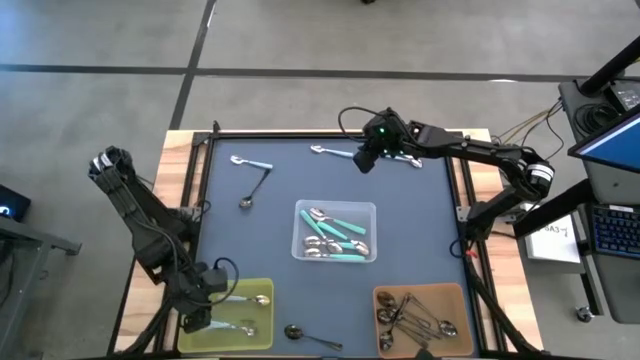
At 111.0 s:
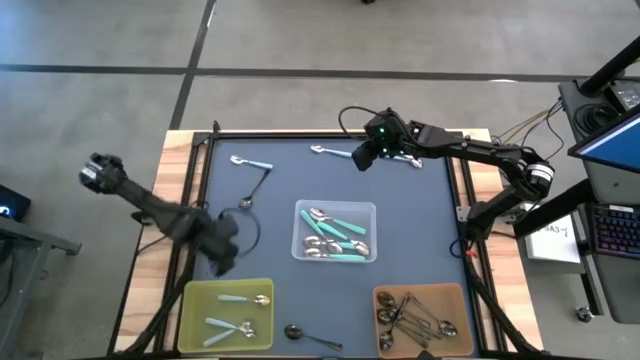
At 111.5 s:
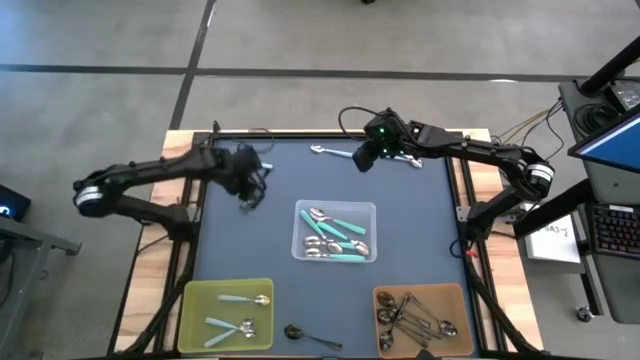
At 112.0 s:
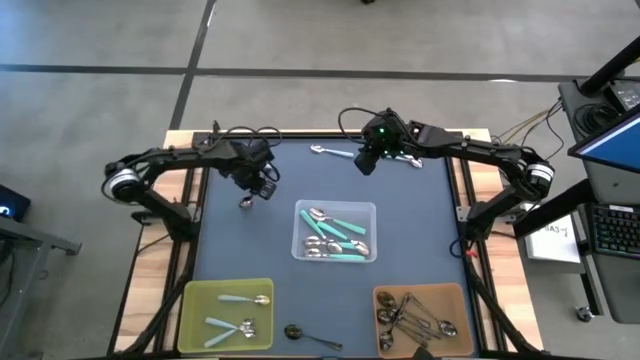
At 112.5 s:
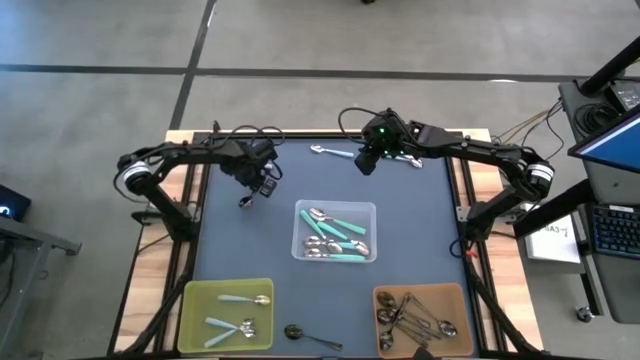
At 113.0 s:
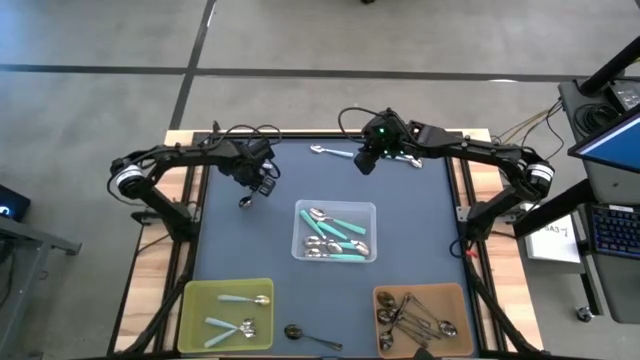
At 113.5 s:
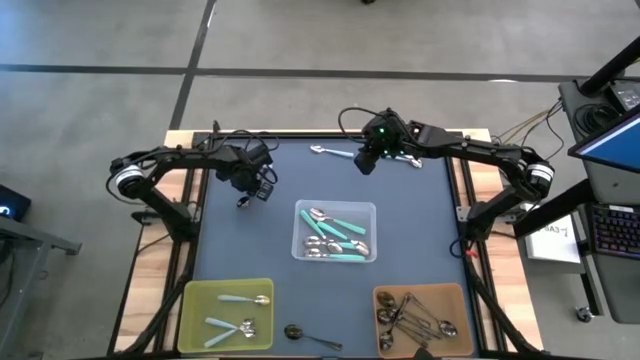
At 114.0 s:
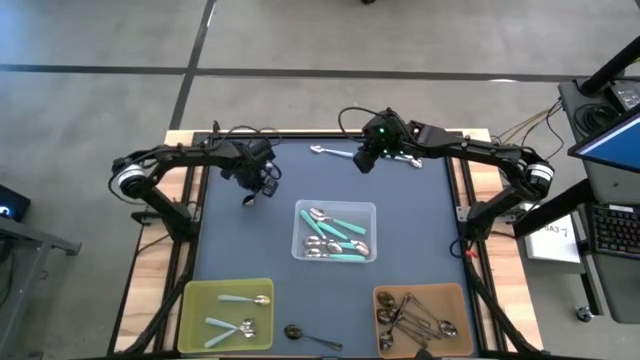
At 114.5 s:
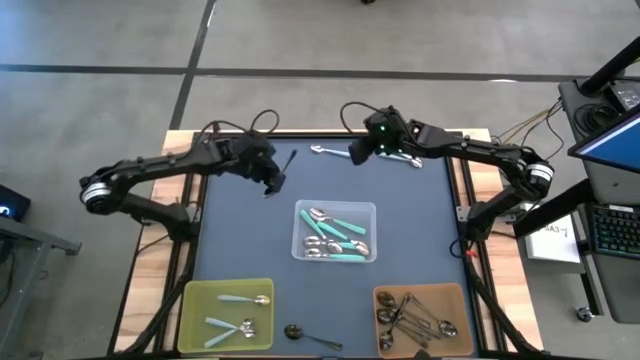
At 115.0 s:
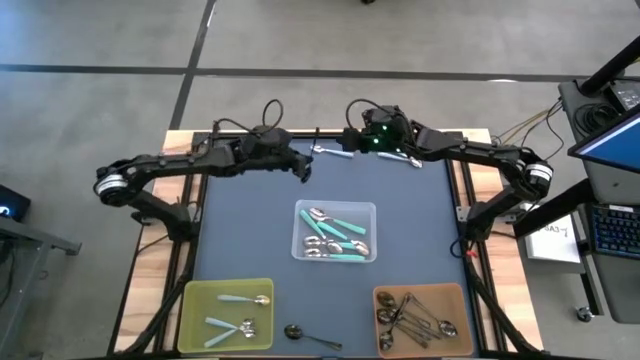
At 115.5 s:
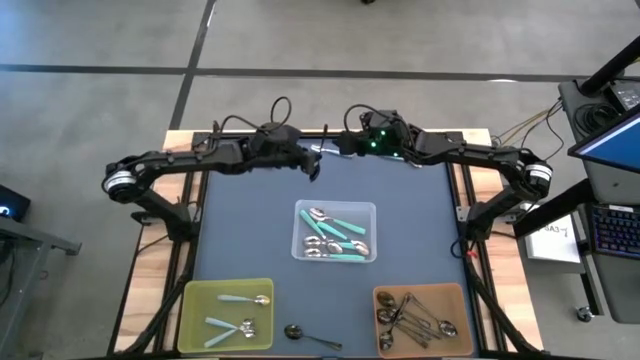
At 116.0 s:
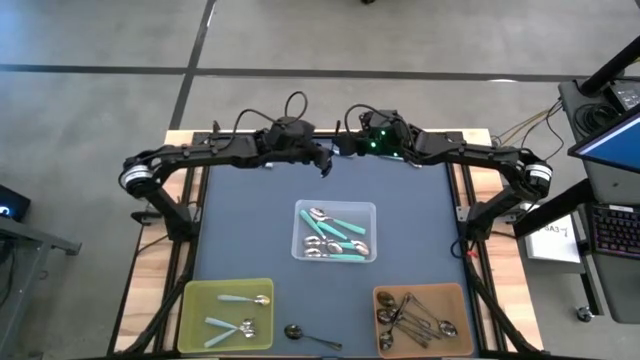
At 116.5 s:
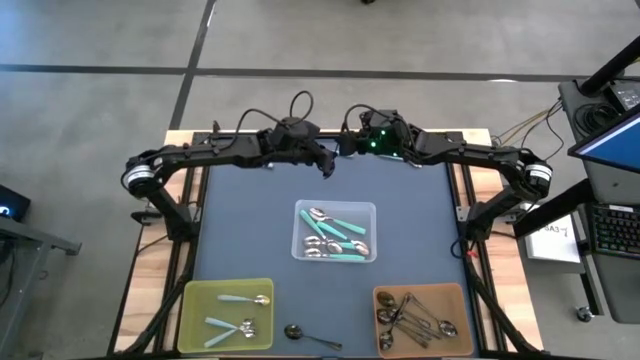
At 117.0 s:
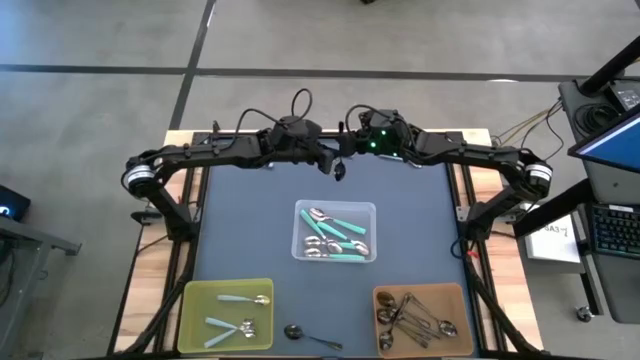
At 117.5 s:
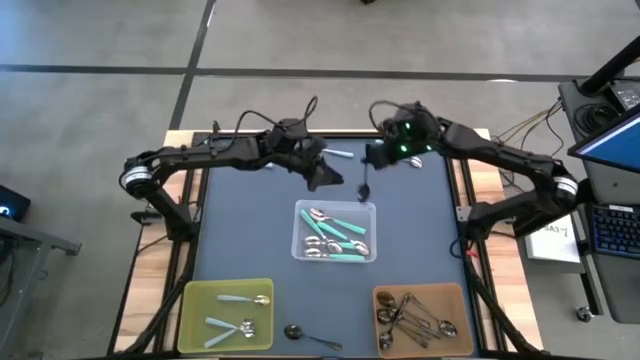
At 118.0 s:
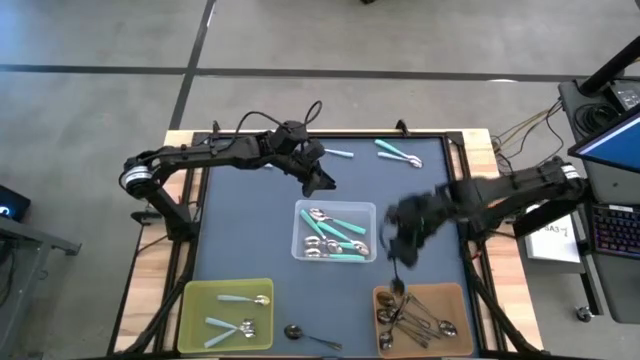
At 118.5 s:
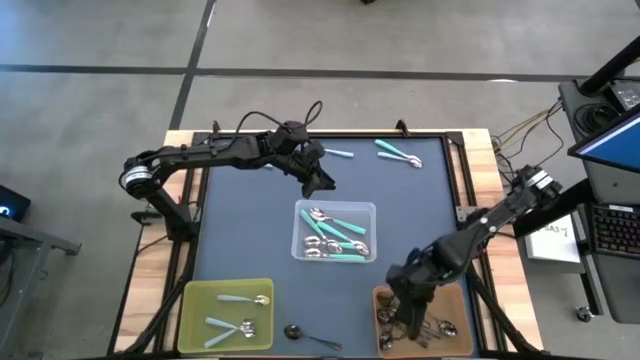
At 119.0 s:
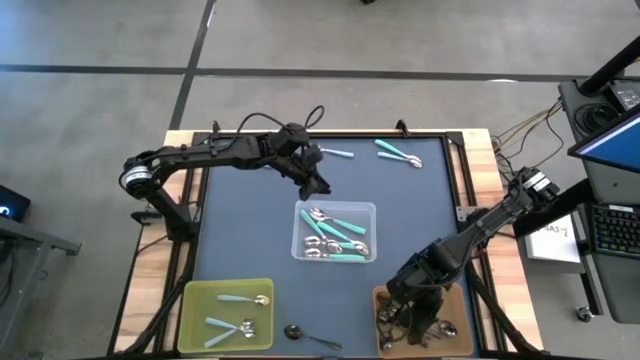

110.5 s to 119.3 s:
Task: Sort silverware by color (type)
Put the black spoon into the orange bin

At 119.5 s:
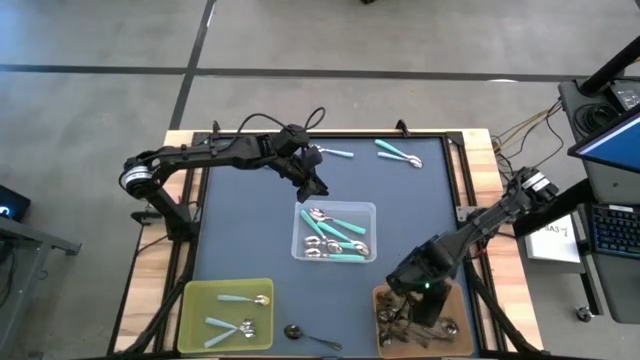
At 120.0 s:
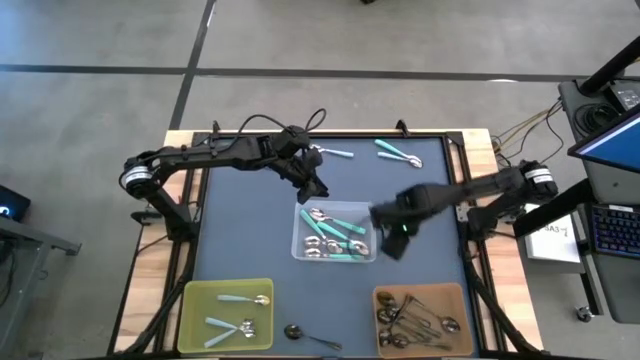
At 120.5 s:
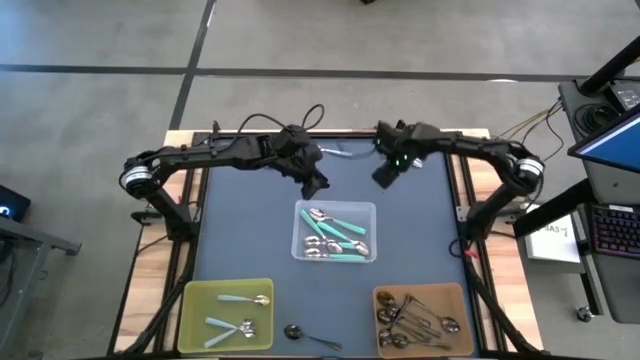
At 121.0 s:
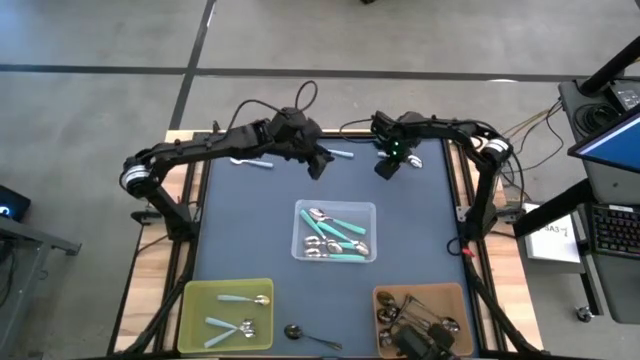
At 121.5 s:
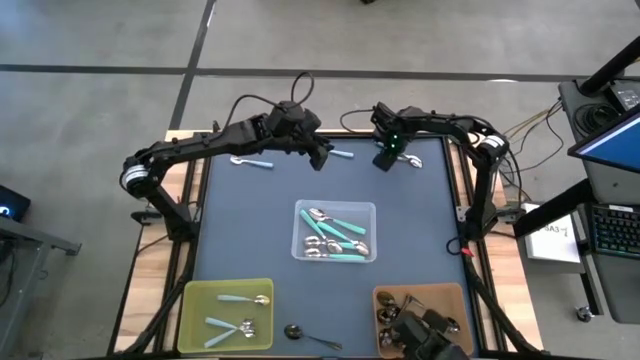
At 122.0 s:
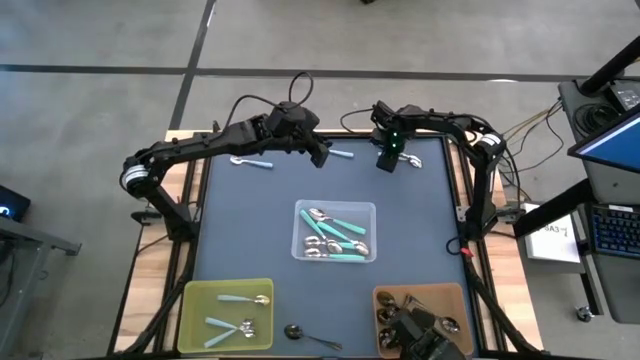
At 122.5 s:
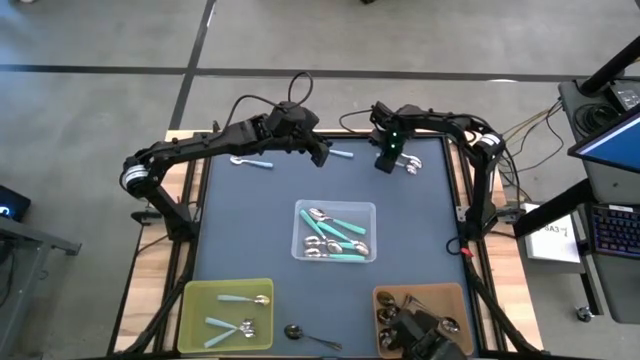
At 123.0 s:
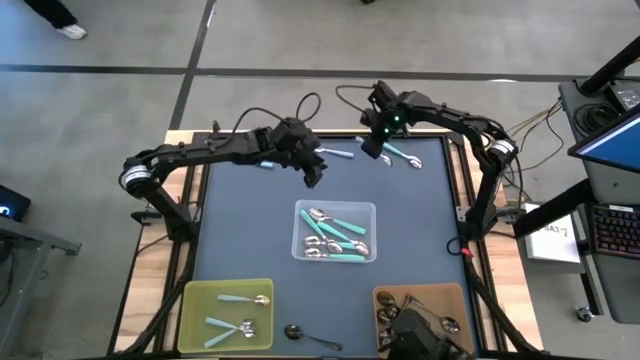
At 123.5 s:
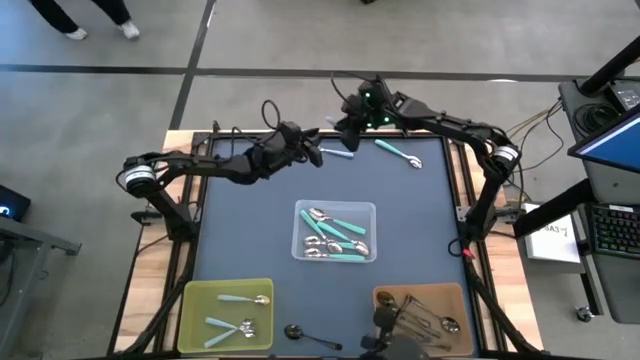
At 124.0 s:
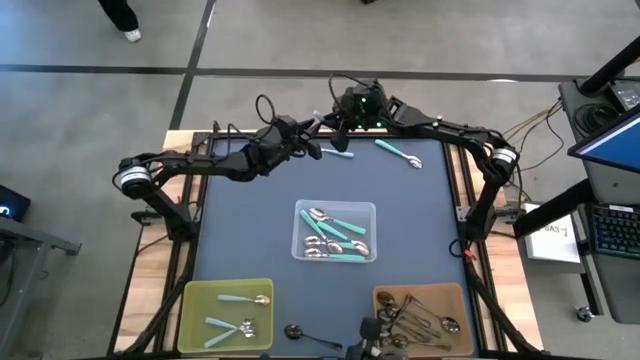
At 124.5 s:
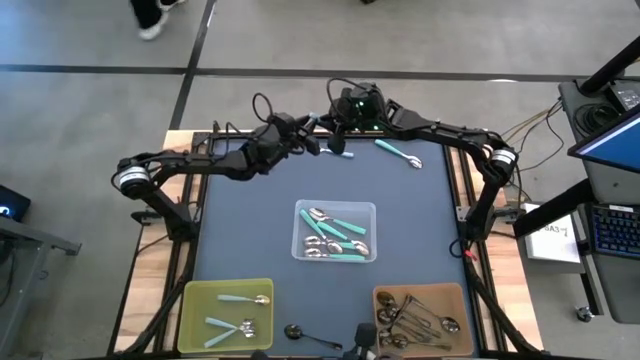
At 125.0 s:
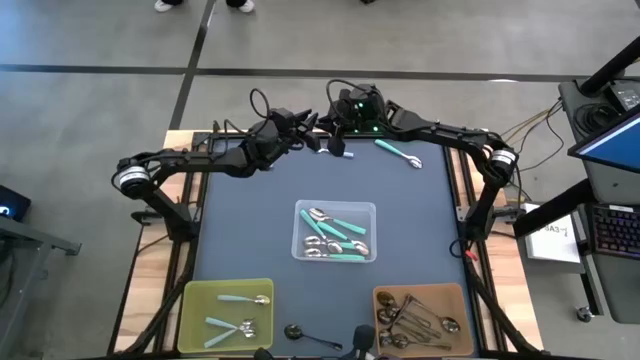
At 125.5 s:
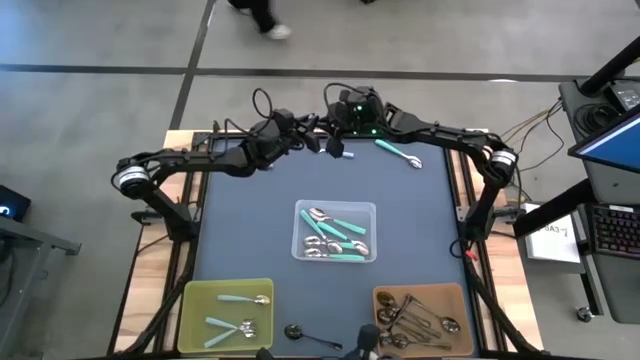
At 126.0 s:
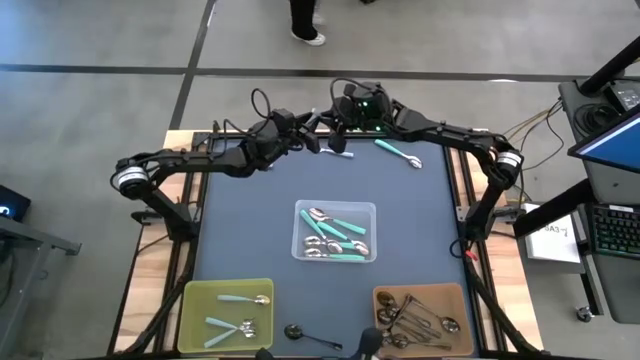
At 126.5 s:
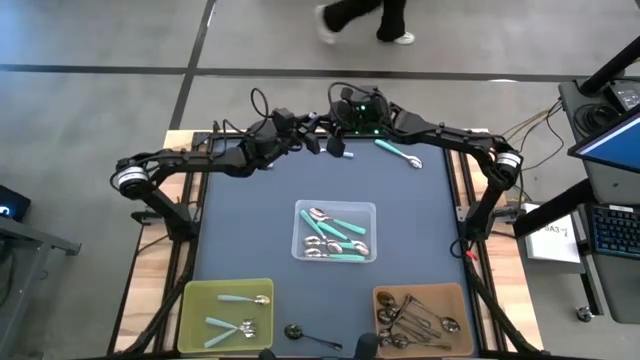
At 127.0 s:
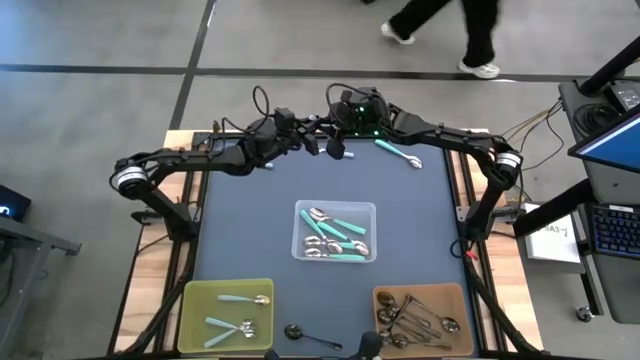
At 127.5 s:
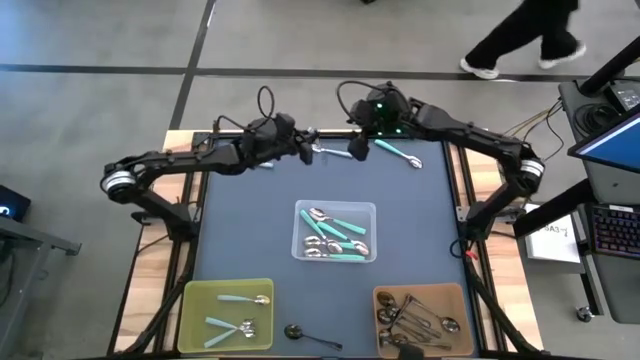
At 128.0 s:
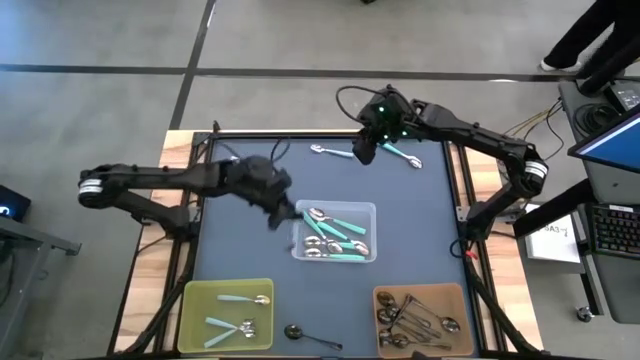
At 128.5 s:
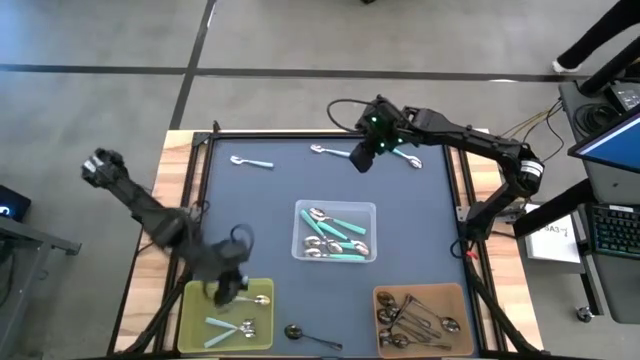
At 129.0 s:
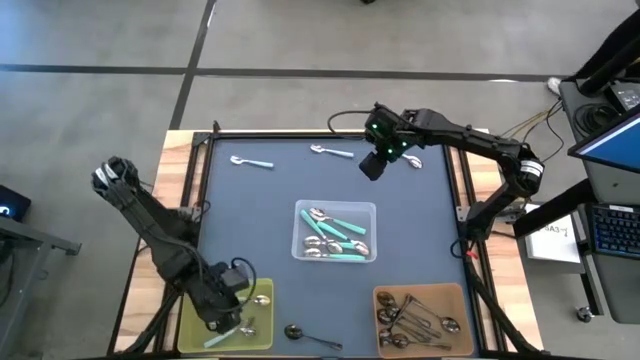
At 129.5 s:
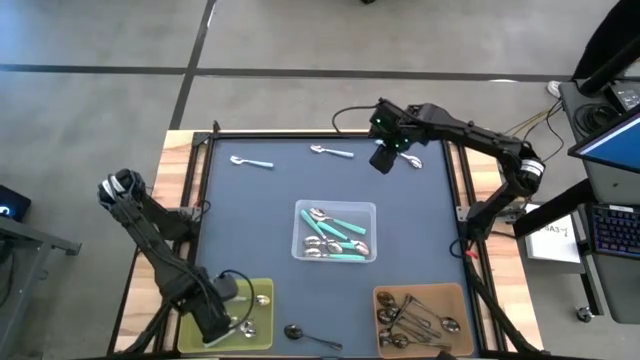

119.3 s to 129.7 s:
Put the light blue spoon into the yellow bin

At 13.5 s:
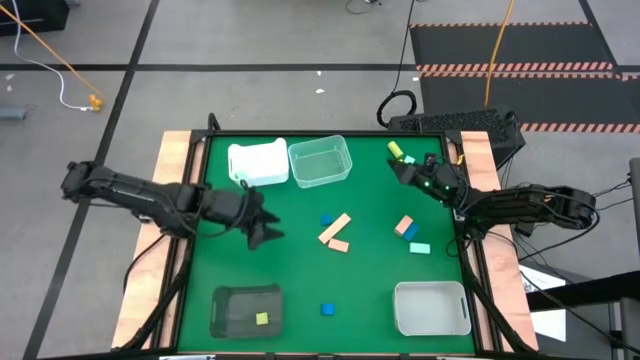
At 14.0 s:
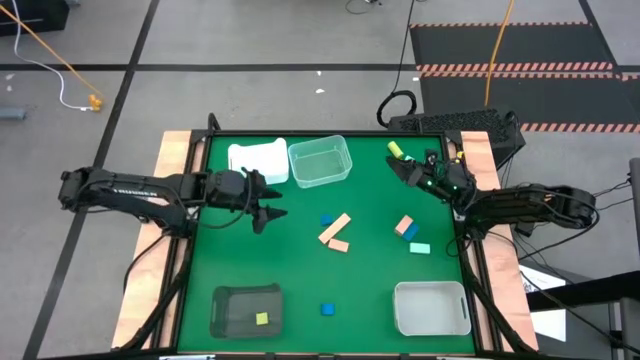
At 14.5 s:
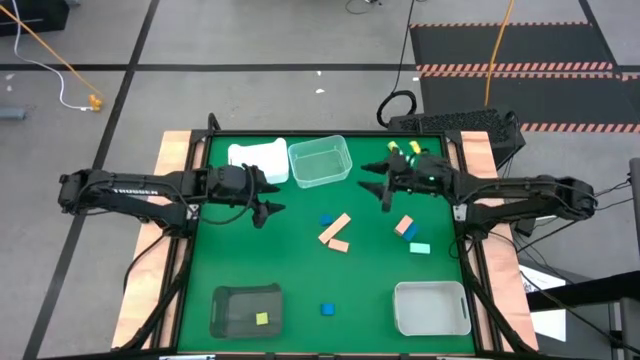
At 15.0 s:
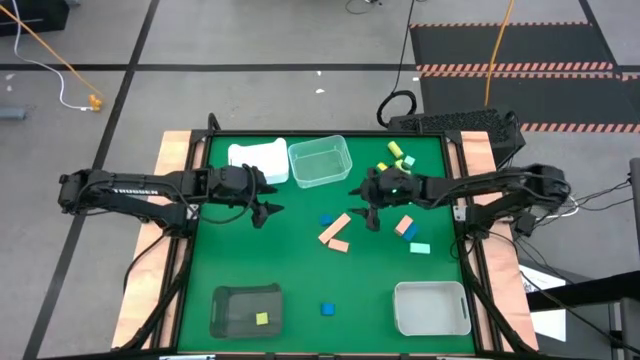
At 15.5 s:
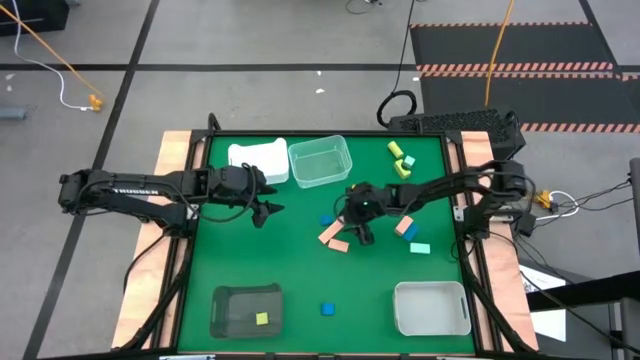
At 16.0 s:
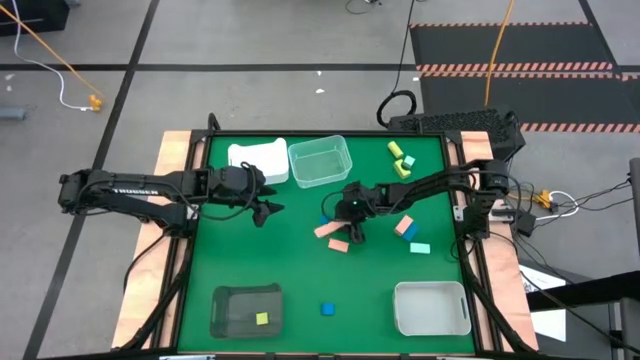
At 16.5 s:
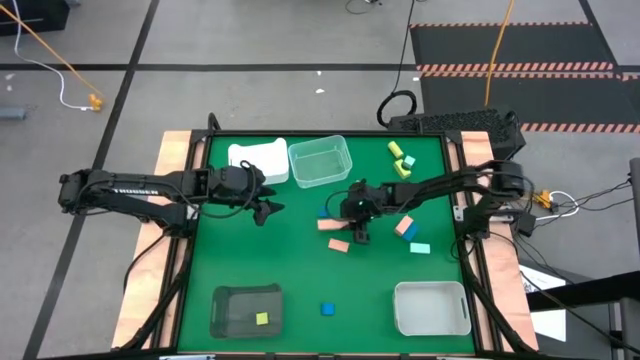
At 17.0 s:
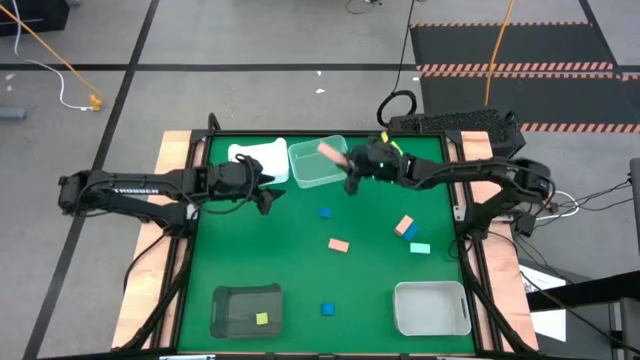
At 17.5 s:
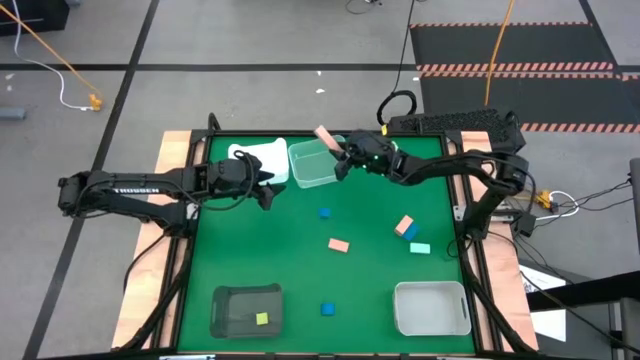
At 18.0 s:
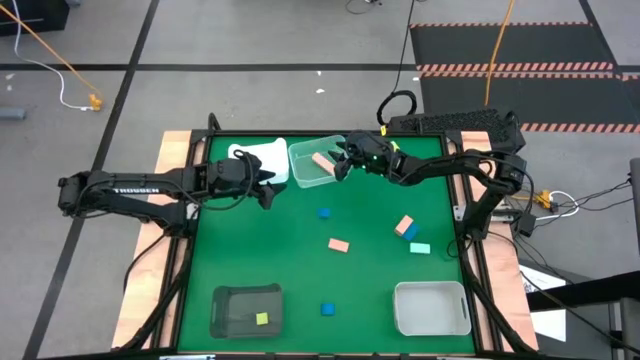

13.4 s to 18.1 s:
Task: Sort & place blocks by color
Put the top left brown block into the transparent bin
